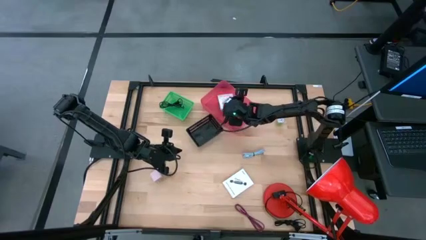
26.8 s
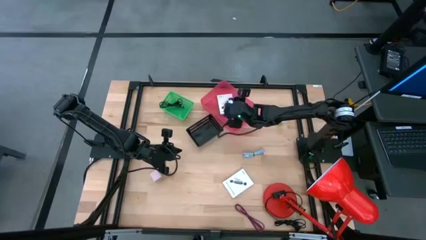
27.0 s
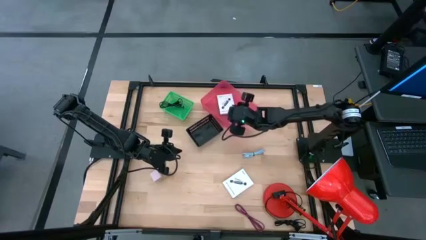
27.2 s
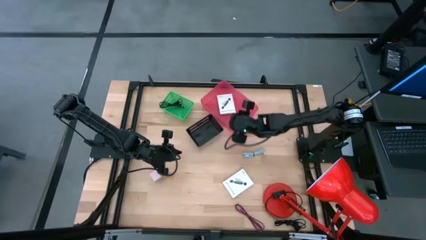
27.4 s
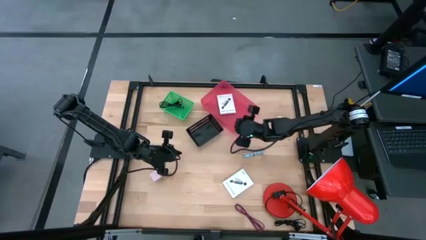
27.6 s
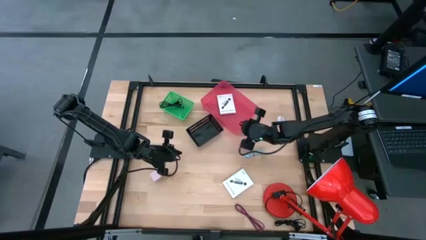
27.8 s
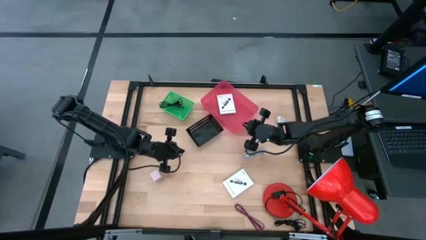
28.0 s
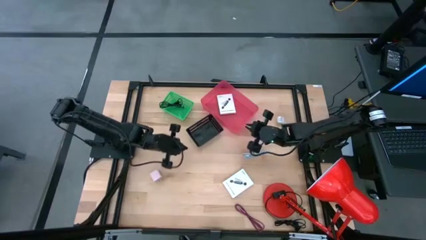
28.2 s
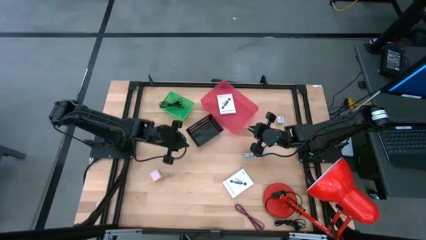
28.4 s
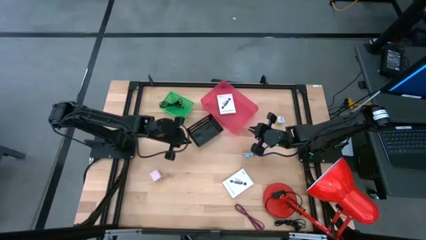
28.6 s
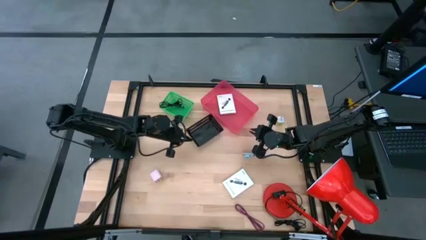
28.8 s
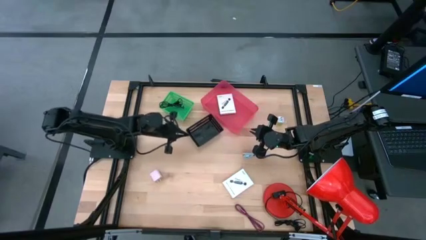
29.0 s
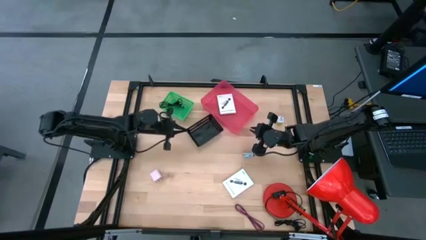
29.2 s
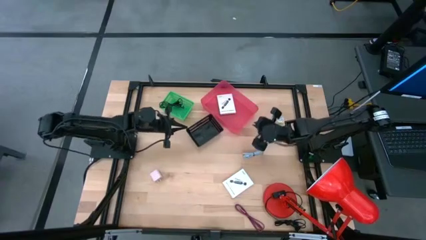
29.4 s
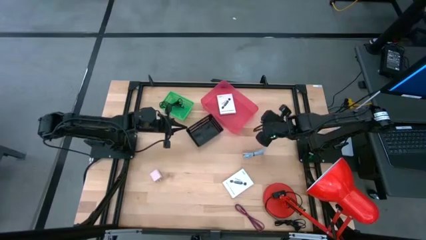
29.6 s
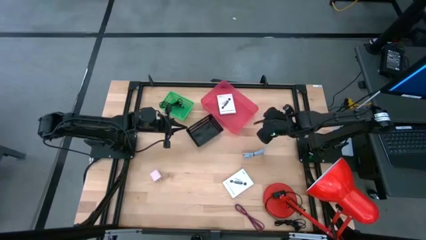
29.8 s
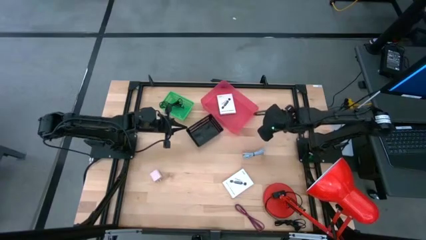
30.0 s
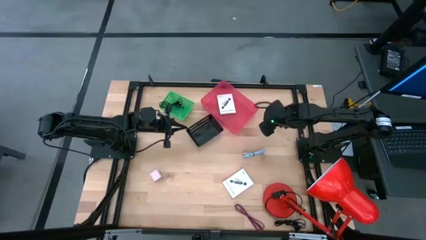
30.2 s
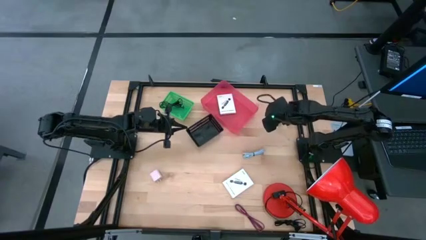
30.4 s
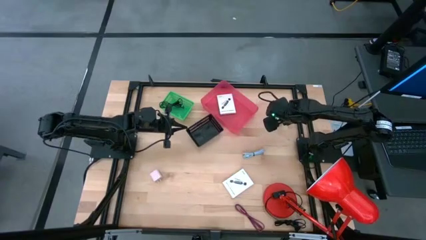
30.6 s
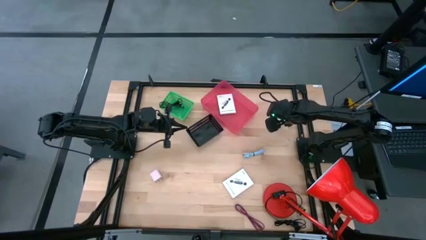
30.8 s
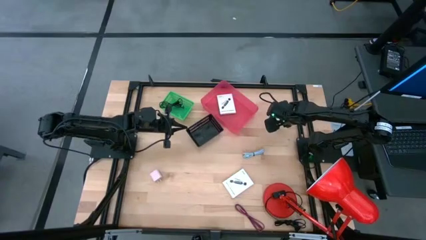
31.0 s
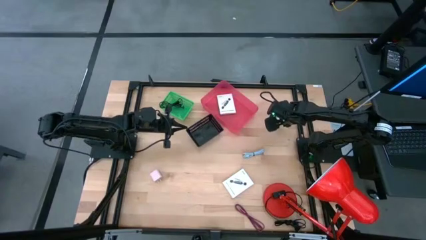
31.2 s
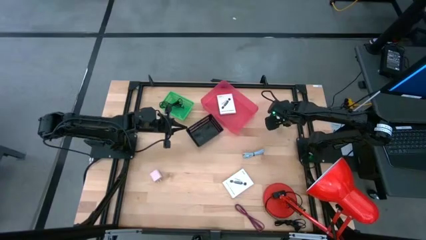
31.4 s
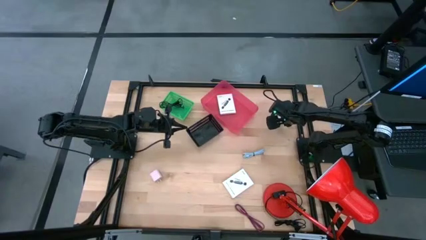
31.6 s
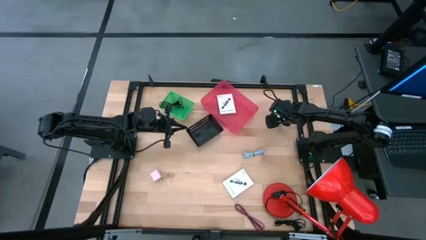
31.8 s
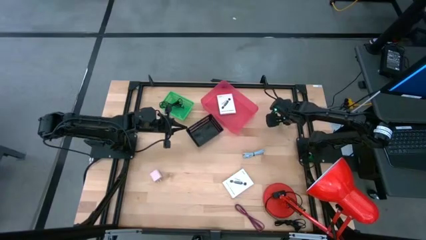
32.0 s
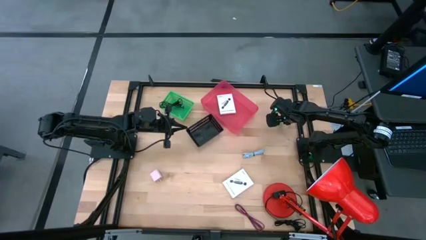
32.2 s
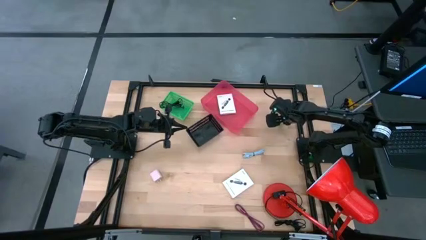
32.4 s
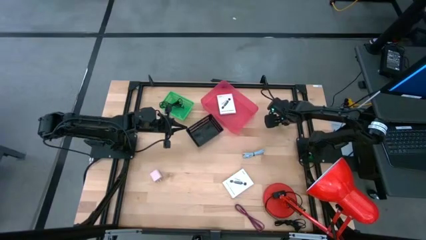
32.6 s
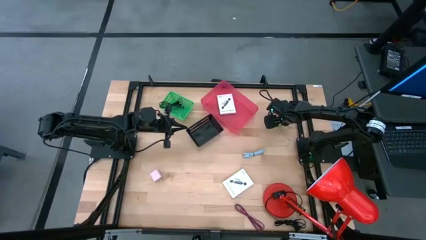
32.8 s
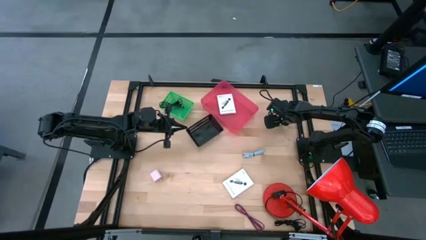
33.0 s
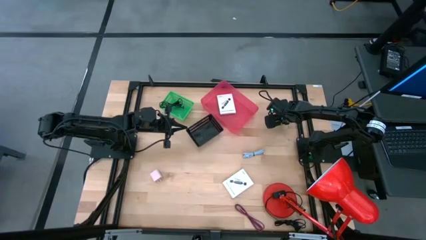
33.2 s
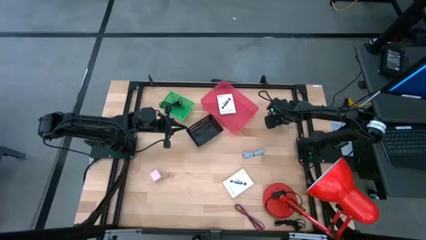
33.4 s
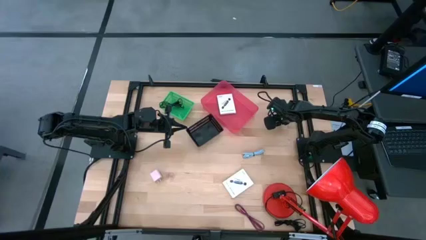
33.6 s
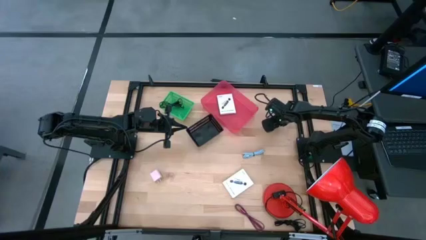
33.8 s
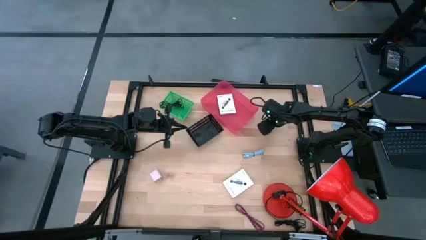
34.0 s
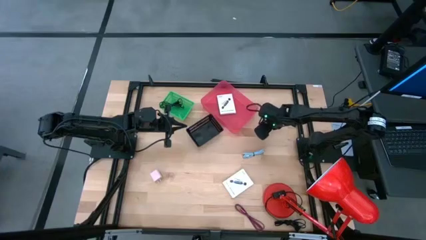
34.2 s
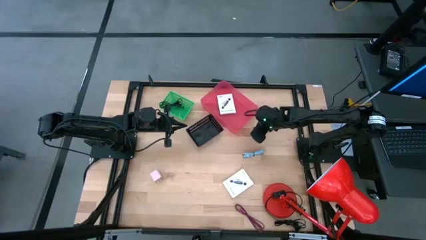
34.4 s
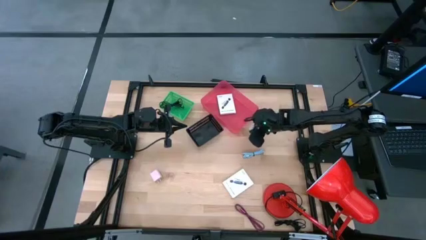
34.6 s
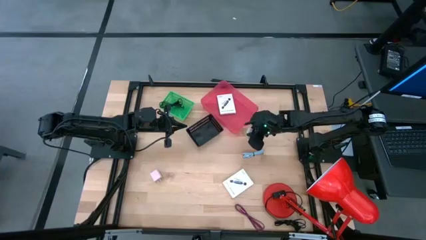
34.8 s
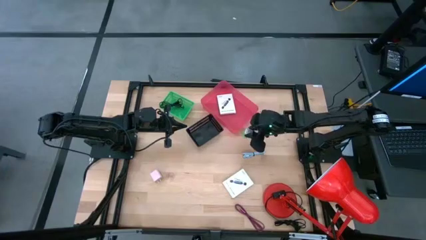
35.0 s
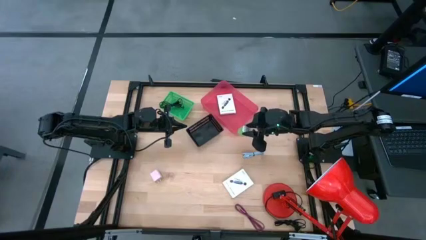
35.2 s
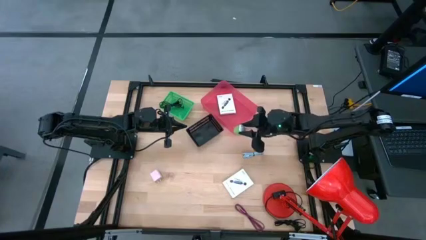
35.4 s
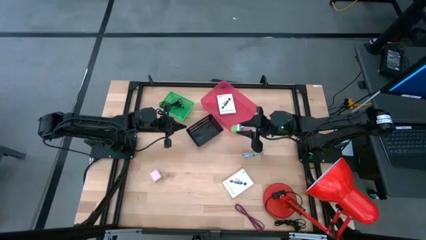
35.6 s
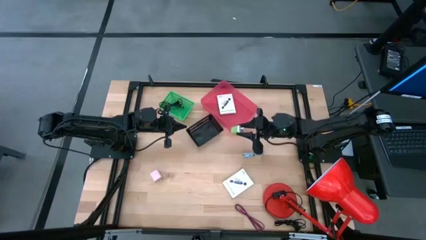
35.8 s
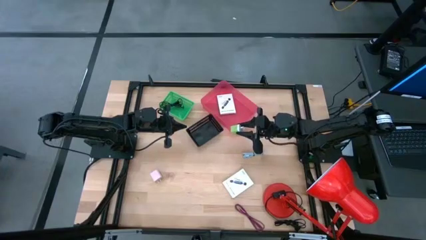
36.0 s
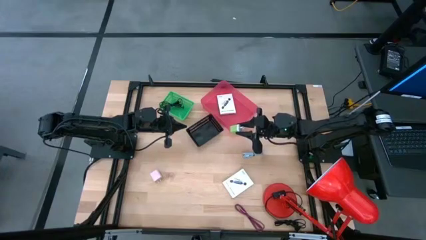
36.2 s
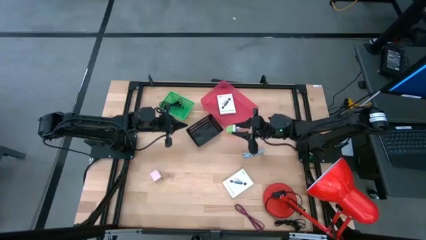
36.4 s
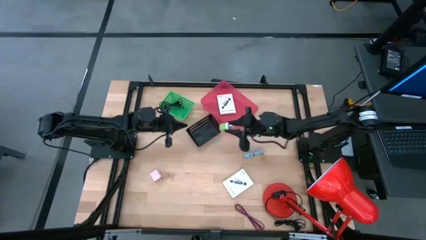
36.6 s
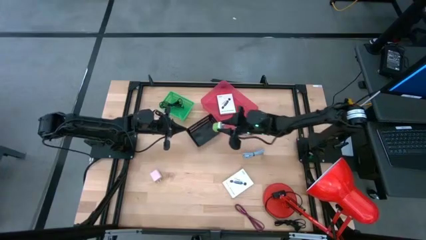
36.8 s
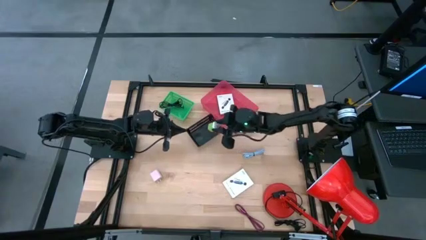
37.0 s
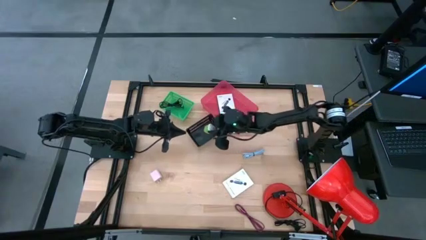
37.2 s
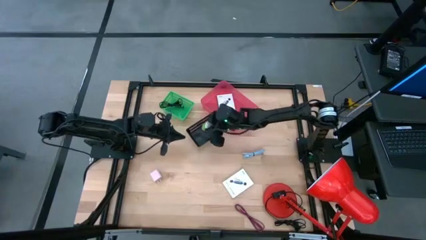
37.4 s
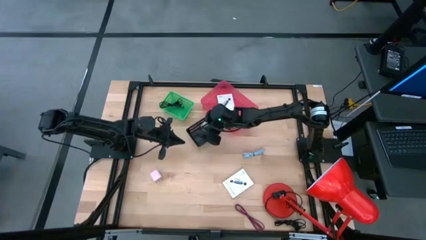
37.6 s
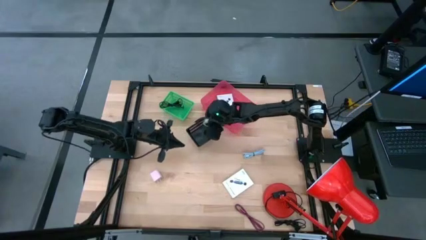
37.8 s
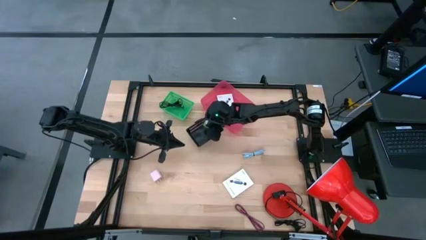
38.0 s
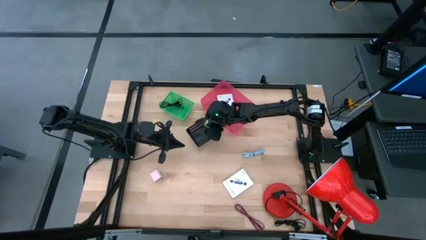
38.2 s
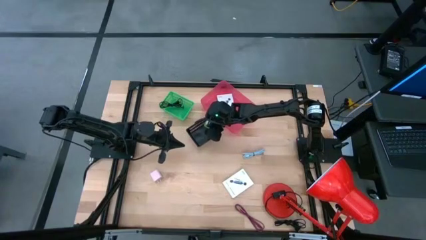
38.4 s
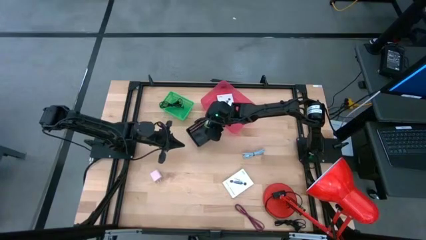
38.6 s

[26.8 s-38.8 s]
Task: Pick and place items into bin
Put the green charger adapter into the black bin
